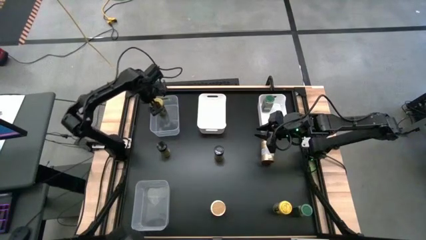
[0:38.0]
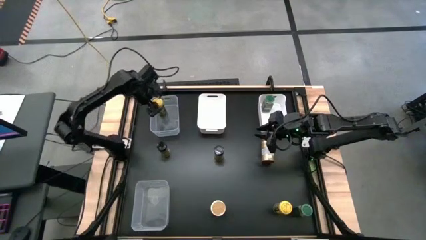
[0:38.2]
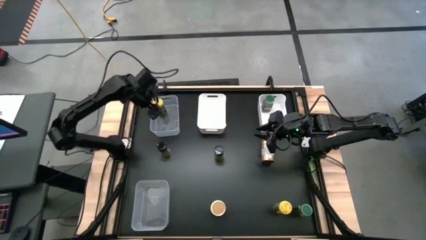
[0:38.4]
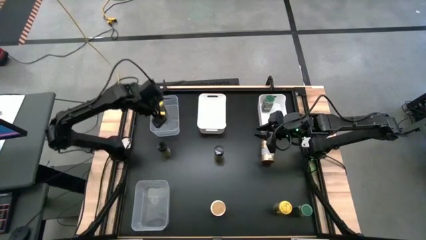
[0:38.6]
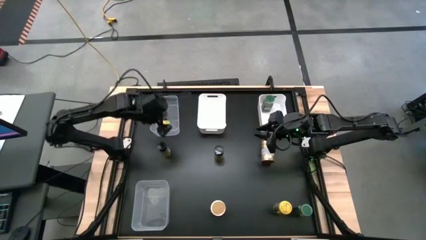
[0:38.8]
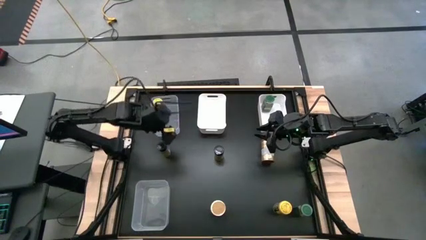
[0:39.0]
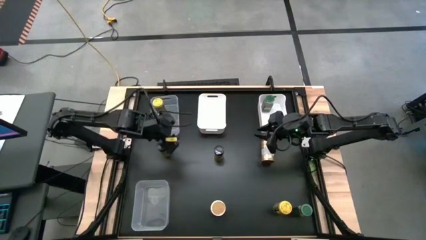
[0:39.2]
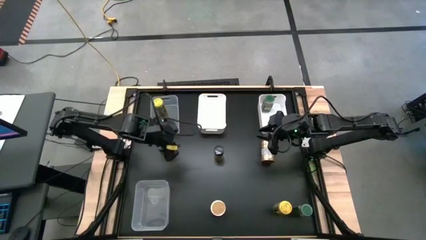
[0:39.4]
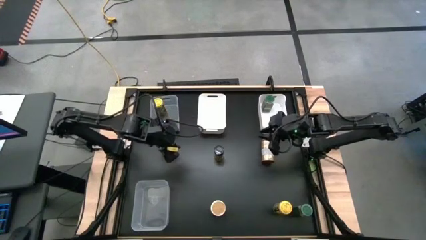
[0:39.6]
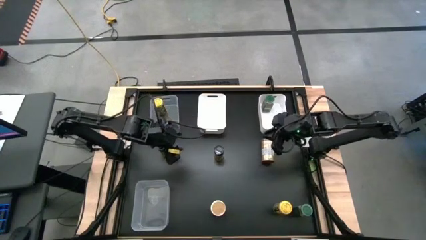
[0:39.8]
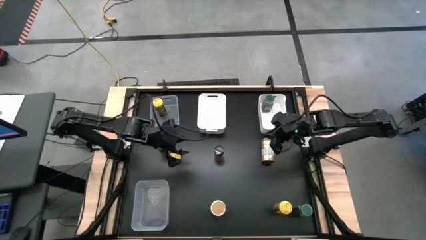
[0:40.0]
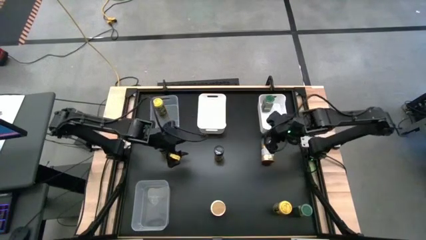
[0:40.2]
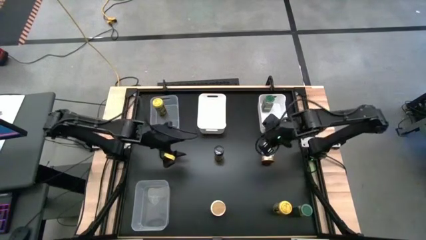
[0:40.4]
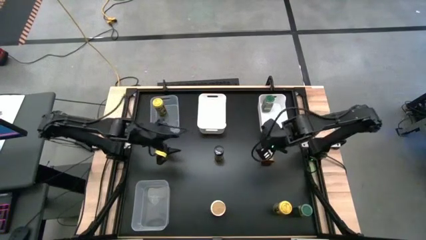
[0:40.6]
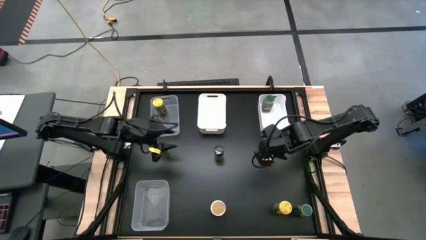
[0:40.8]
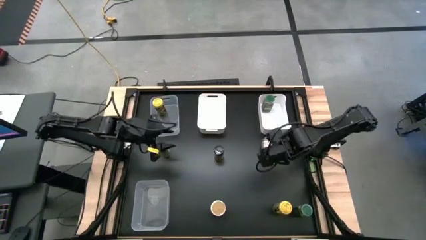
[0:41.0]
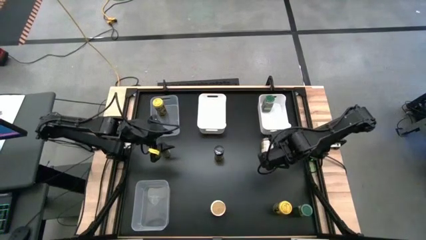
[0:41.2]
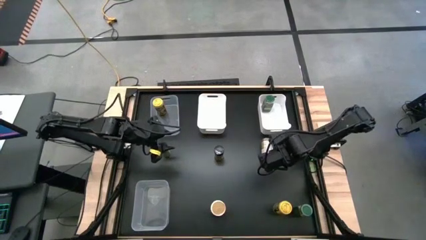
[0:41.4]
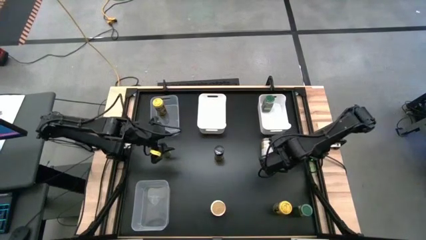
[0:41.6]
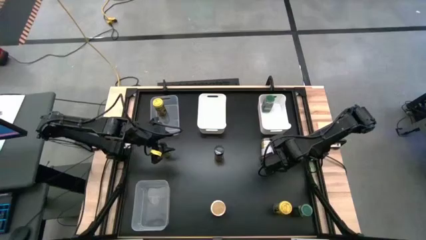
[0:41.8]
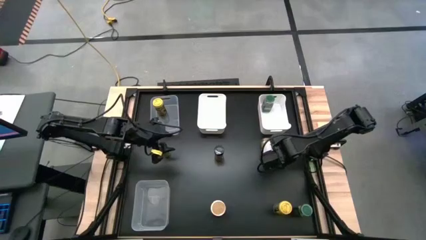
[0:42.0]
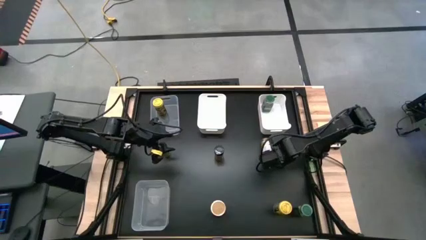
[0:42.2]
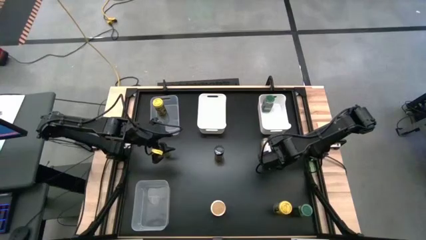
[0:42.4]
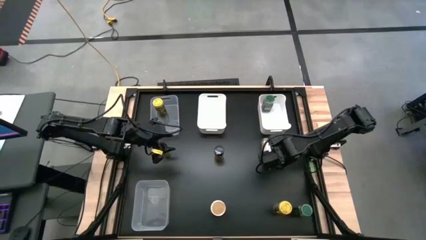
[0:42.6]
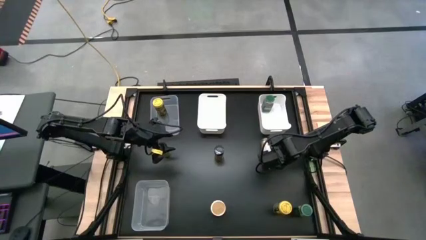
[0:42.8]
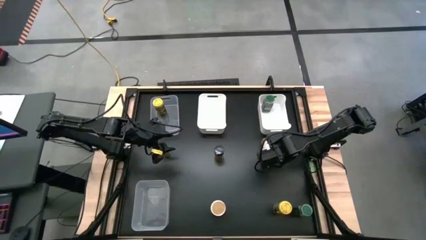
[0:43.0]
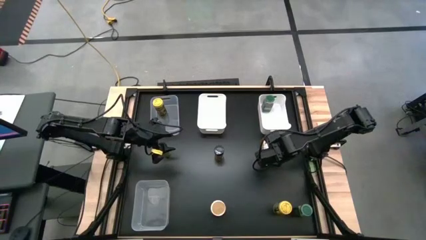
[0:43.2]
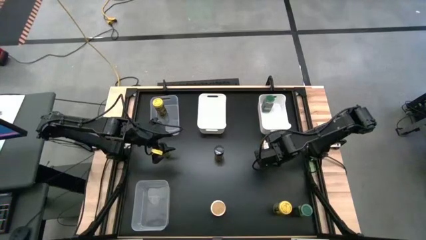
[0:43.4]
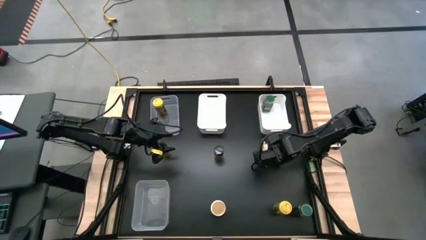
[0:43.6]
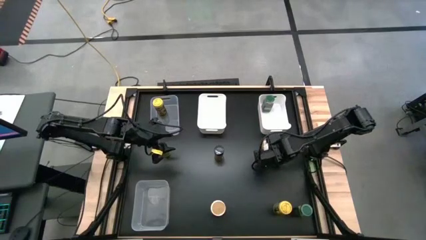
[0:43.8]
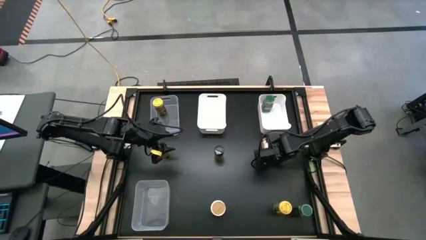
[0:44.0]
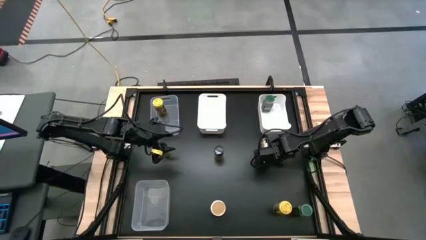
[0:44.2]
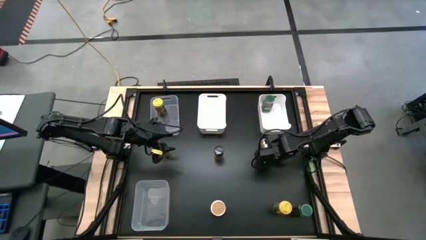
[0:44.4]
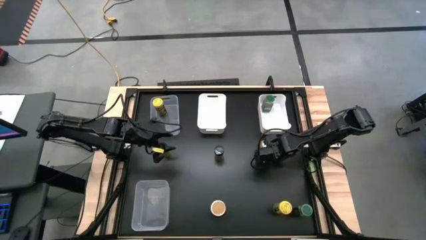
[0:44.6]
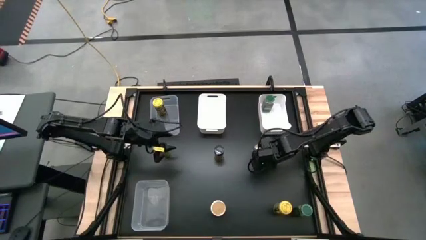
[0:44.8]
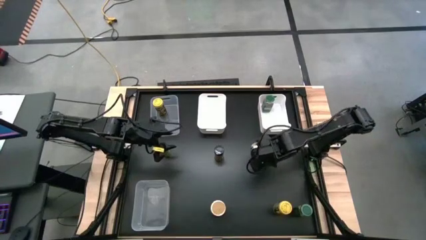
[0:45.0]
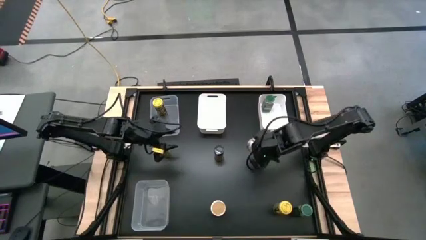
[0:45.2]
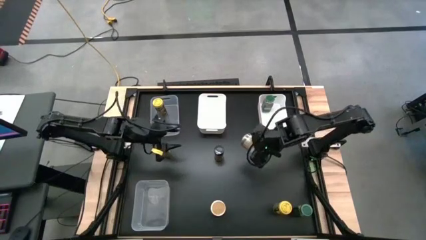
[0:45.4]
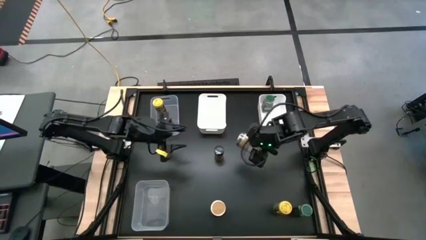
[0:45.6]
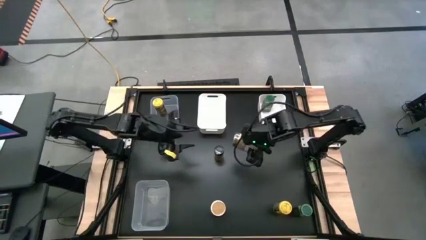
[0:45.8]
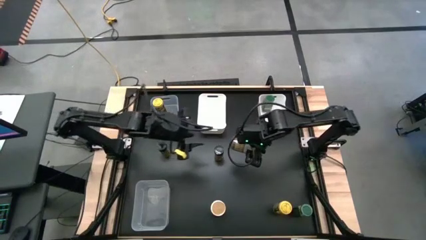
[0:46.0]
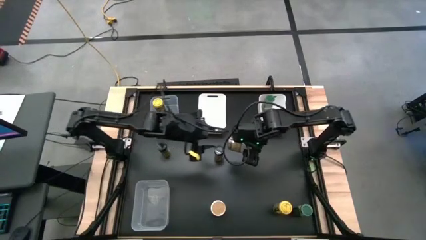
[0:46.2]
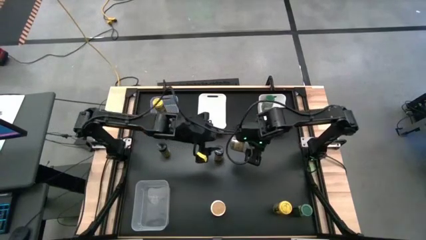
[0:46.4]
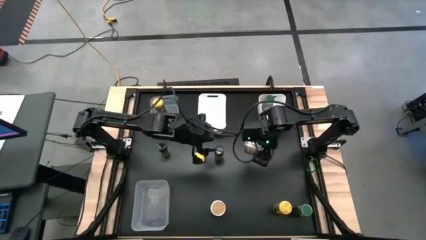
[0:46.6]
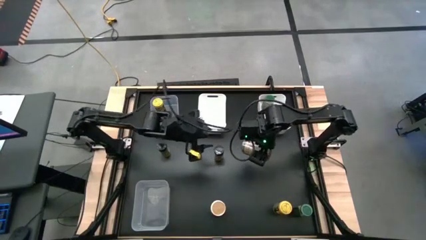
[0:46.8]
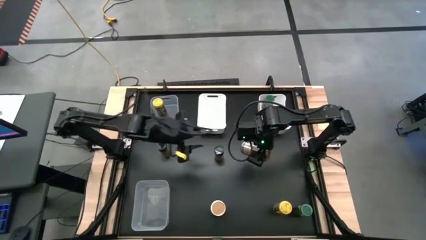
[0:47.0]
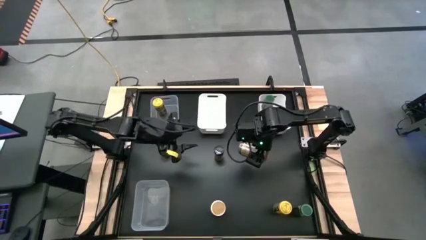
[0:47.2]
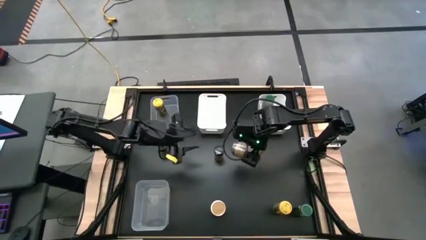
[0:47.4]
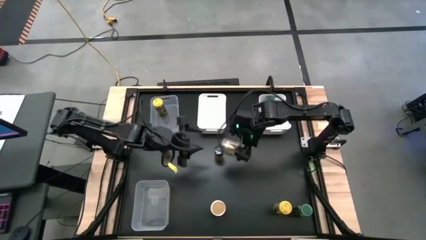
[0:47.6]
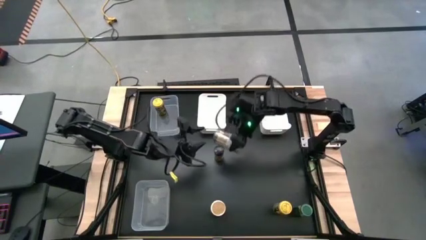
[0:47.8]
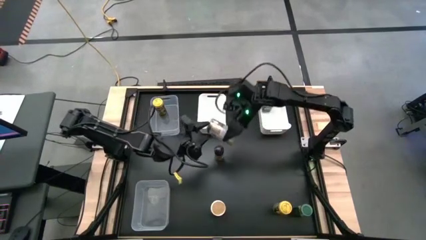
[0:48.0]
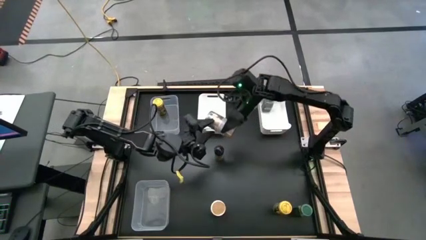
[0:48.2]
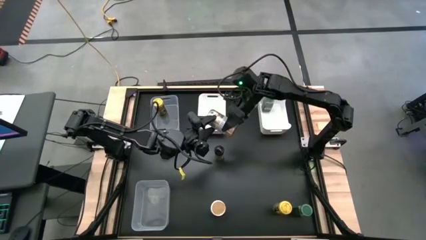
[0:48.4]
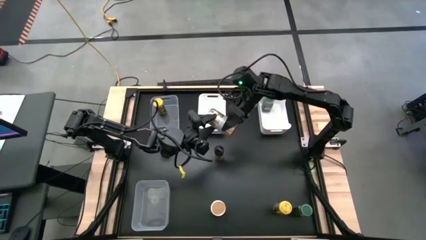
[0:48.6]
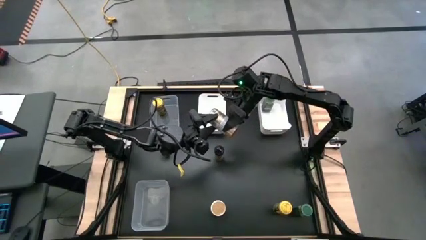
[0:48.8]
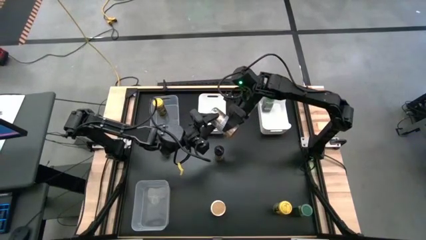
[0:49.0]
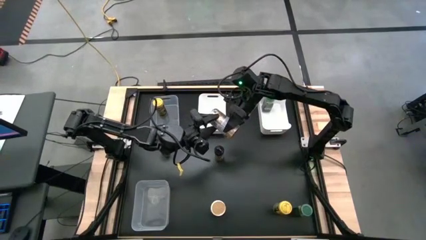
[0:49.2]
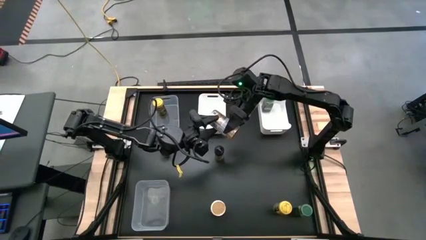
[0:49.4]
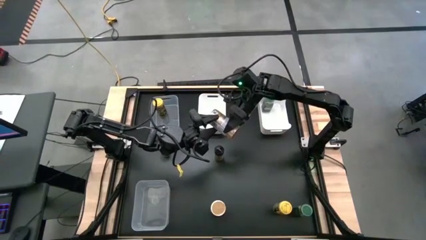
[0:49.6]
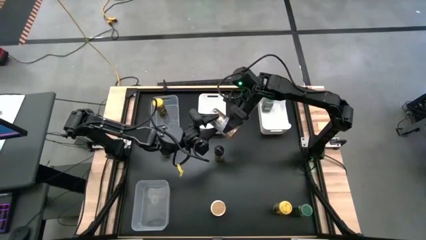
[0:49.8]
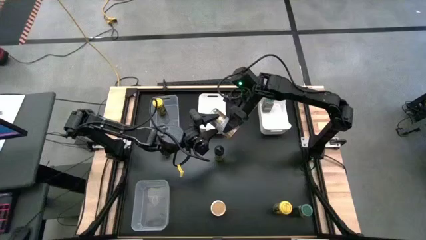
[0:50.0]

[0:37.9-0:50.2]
Task: Sort spices by type
Put the top gold spice bottle into the left white bin
